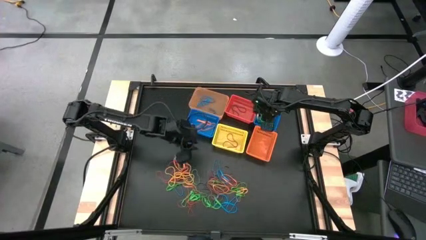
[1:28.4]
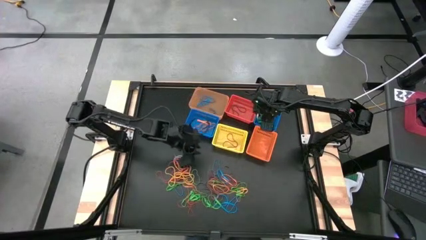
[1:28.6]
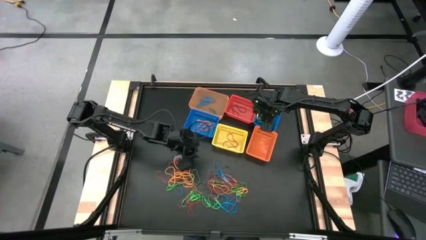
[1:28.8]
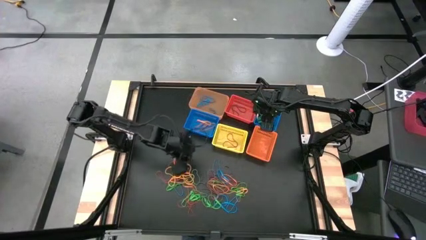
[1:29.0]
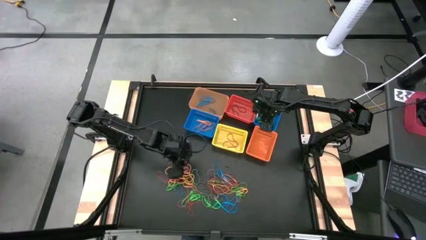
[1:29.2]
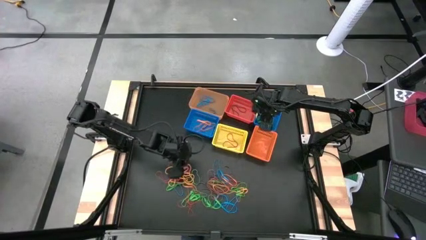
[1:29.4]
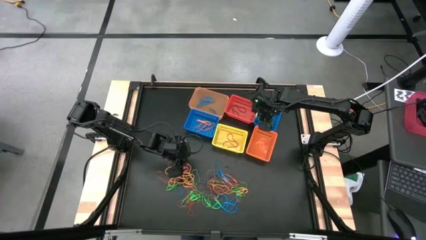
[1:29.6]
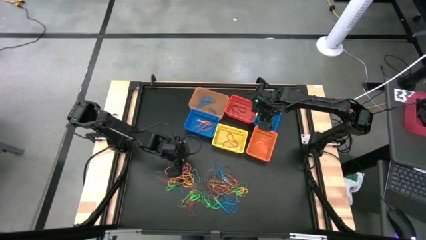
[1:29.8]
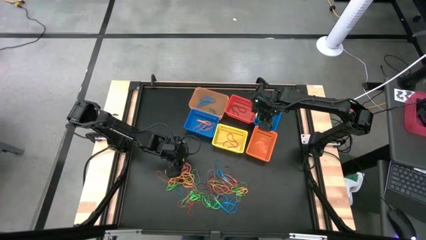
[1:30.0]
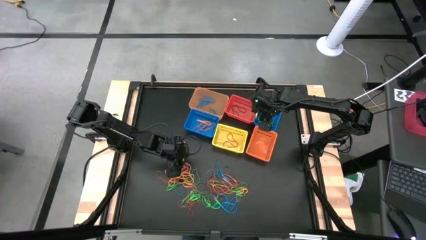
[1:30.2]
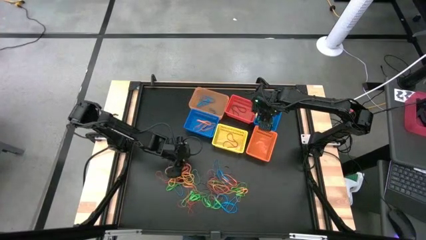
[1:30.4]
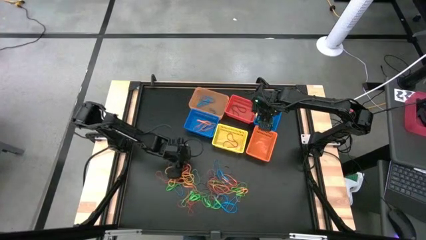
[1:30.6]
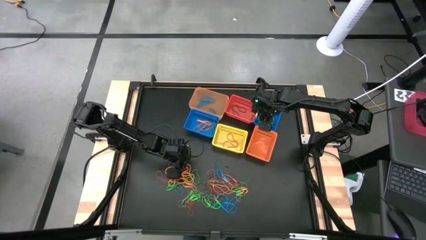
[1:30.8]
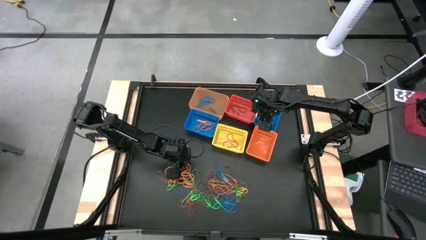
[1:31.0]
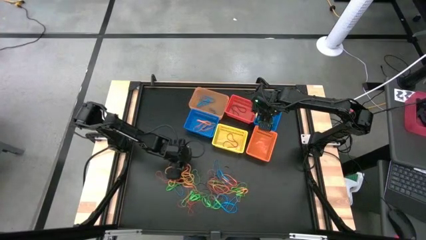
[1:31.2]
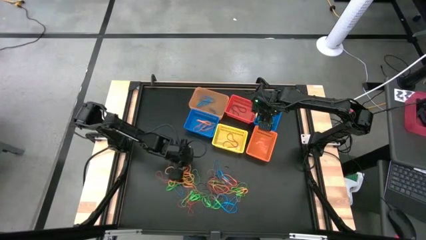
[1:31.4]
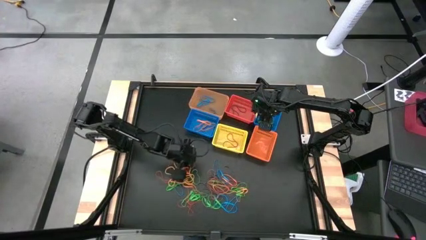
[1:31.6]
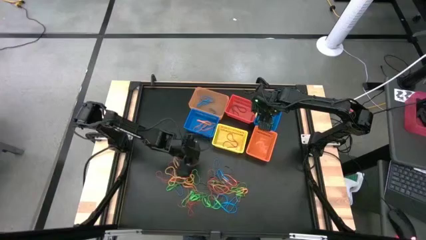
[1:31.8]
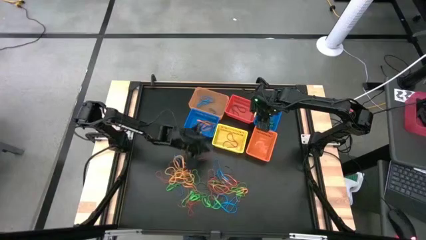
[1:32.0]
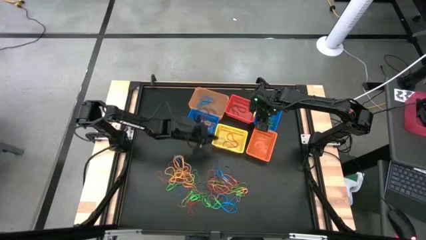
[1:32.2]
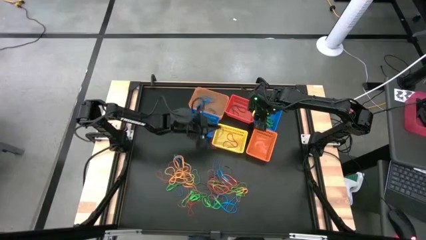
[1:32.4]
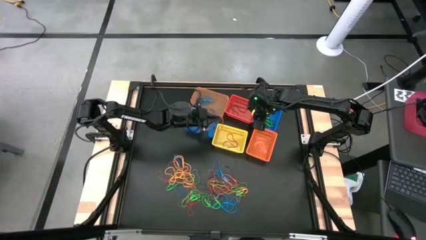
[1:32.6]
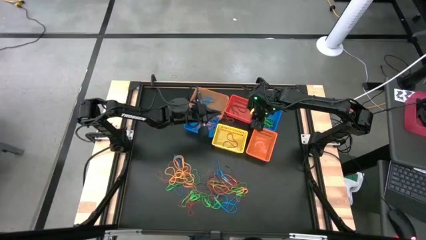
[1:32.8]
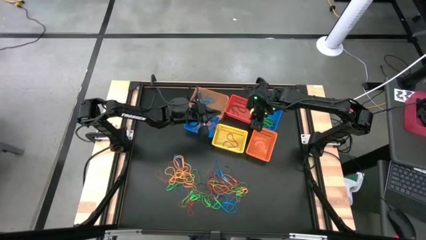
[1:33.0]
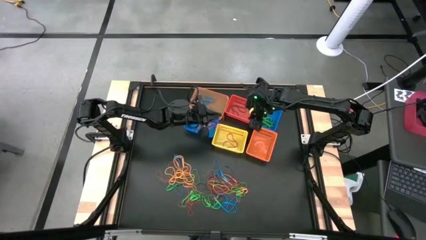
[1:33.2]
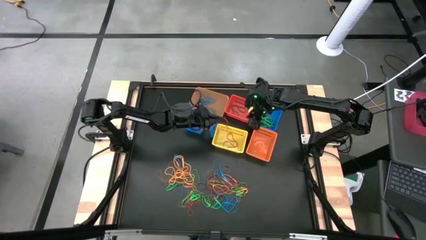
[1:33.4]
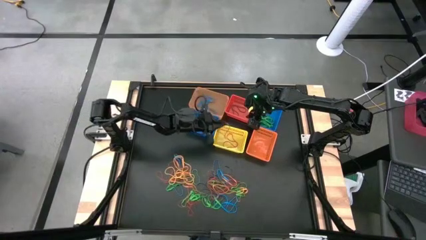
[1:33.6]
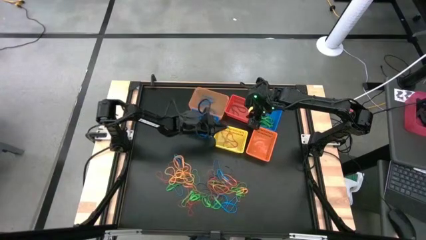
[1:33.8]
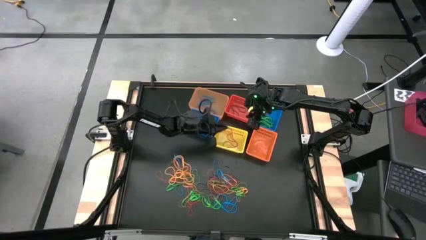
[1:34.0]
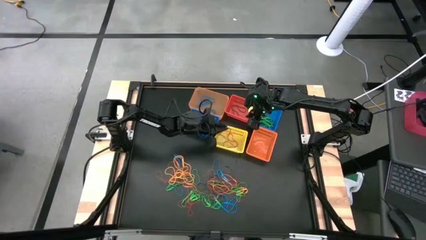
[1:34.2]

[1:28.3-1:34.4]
Task: Sort rubber bands into baskets
Put the red rubber band into the yellow basket

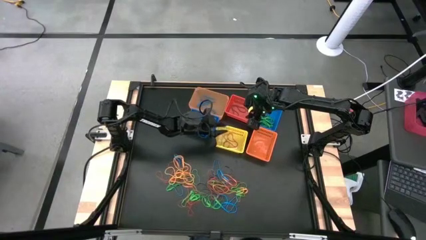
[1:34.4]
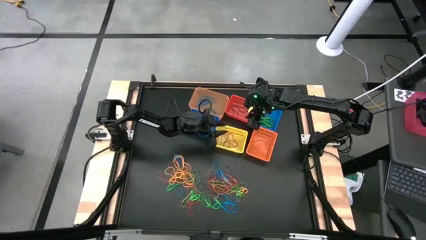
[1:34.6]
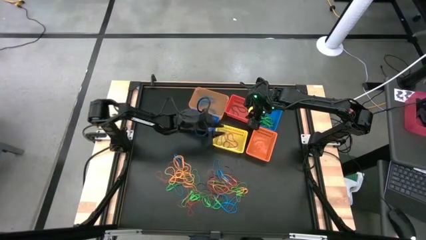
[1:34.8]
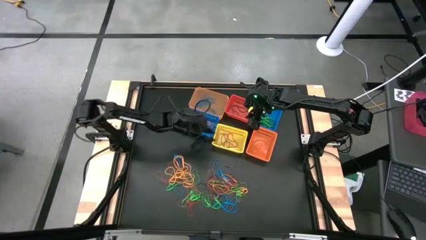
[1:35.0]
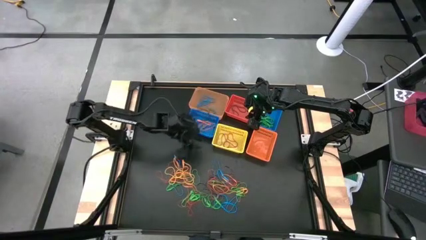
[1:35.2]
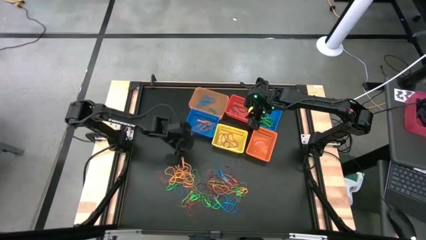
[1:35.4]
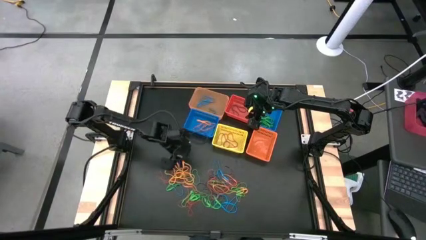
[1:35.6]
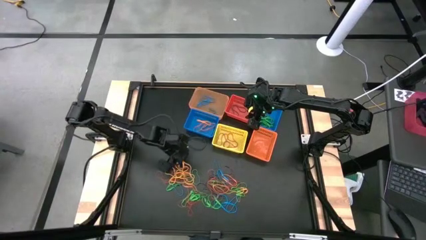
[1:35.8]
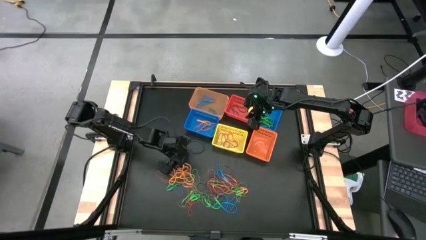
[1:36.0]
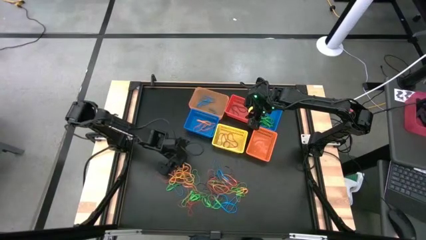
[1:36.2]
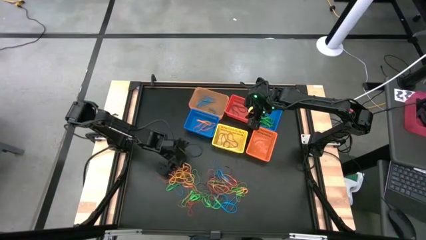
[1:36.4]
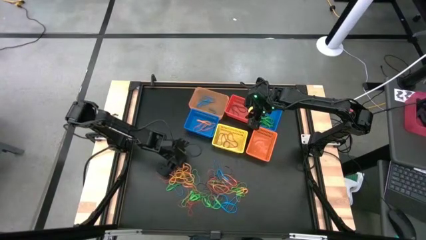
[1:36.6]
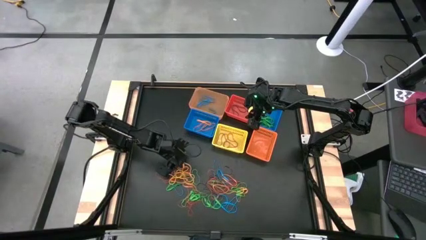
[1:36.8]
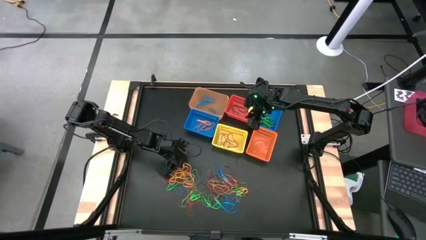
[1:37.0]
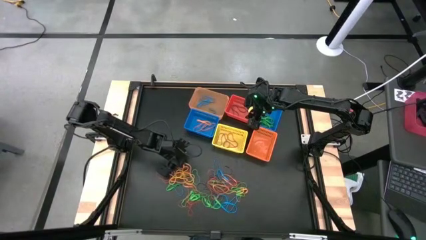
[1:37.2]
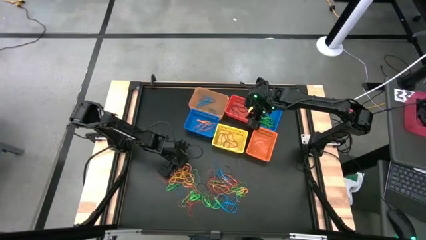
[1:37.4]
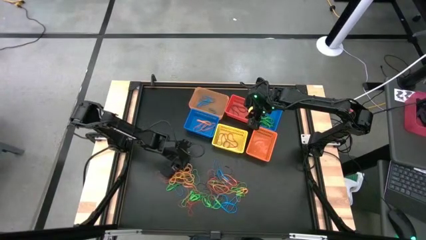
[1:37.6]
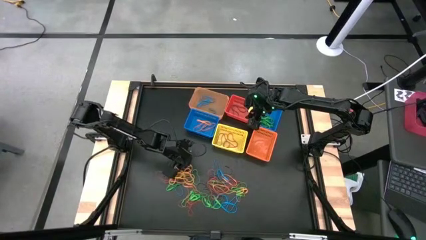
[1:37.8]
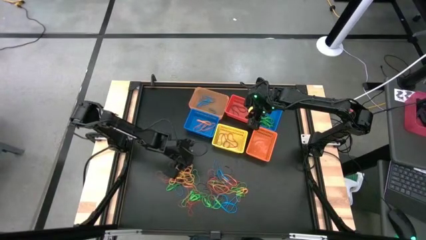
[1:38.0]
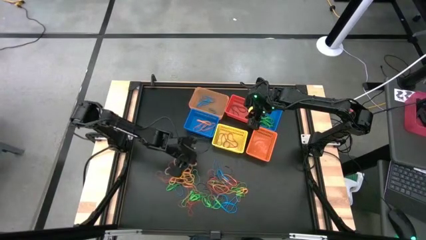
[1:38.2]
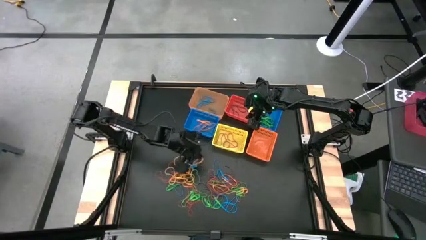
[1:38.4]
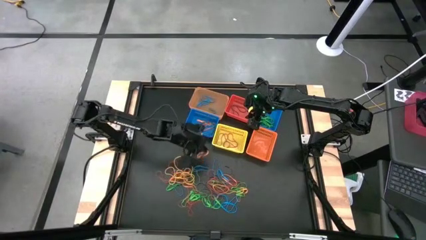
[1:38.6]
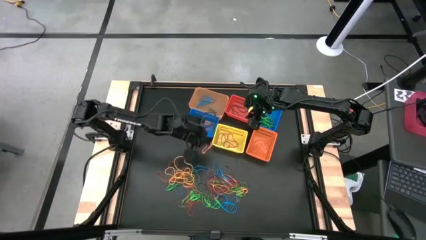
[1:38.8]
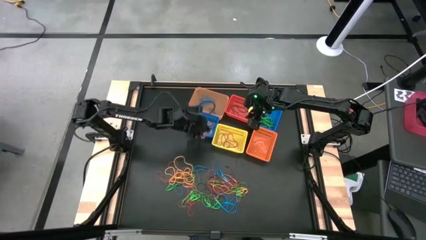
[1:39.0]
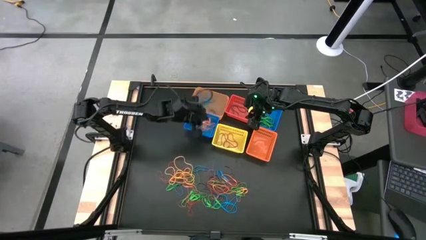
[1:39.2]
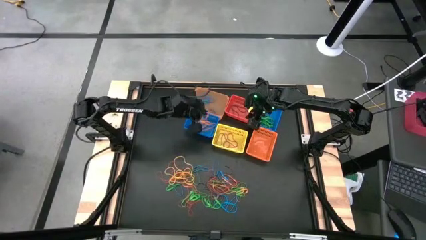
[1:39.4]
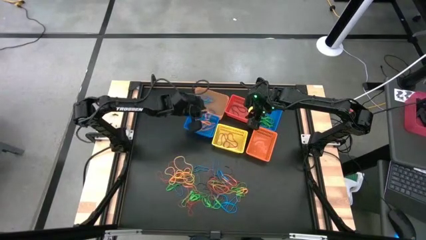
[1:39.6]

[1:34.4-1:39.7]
Put the orange rubber band into the left blue basket

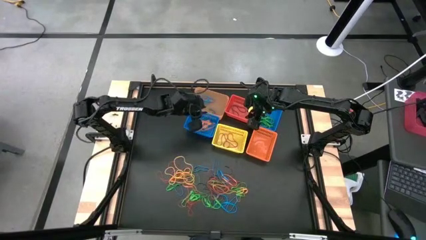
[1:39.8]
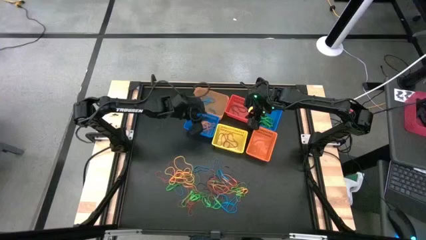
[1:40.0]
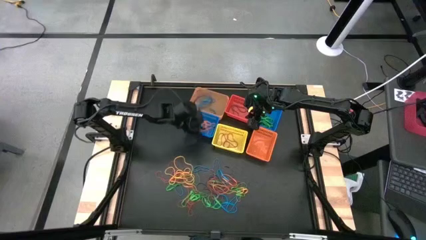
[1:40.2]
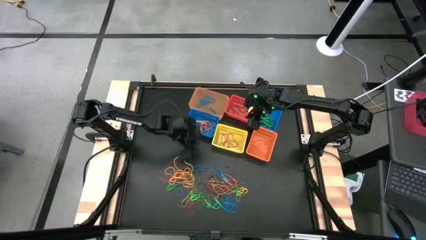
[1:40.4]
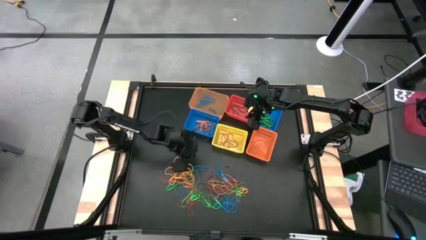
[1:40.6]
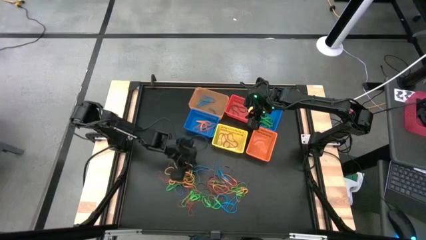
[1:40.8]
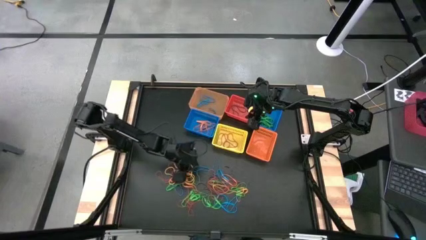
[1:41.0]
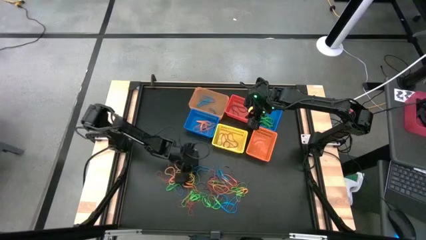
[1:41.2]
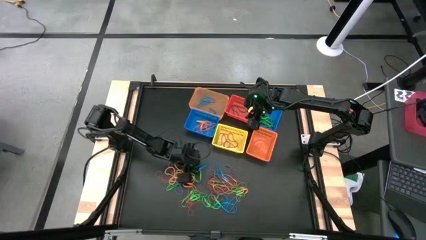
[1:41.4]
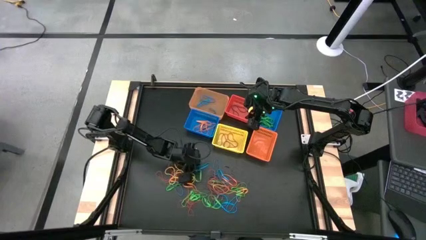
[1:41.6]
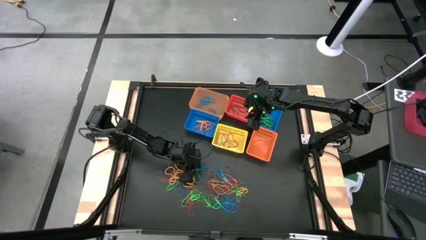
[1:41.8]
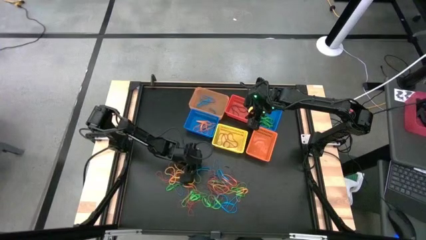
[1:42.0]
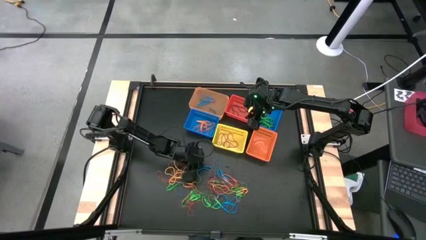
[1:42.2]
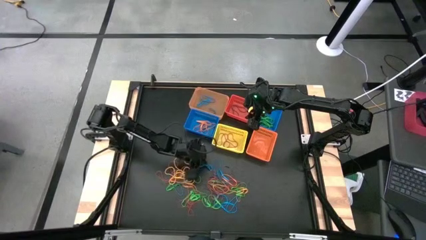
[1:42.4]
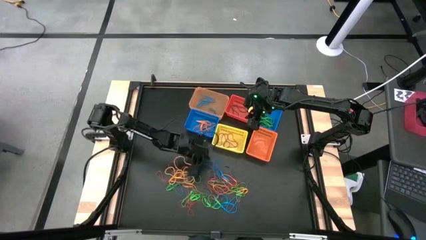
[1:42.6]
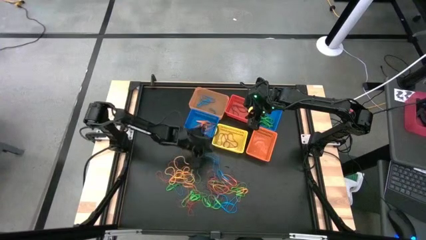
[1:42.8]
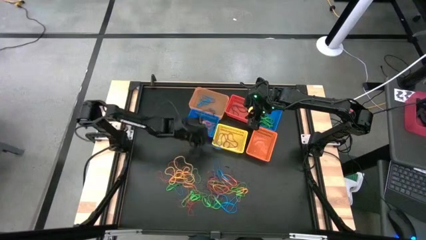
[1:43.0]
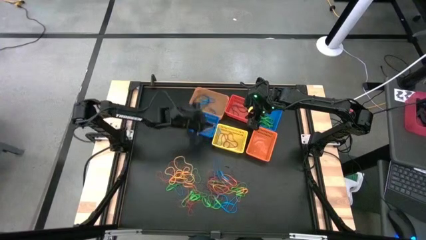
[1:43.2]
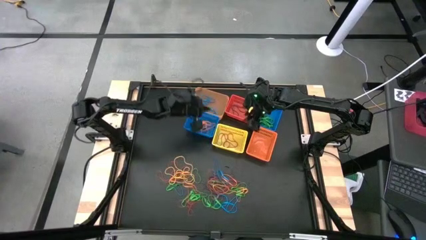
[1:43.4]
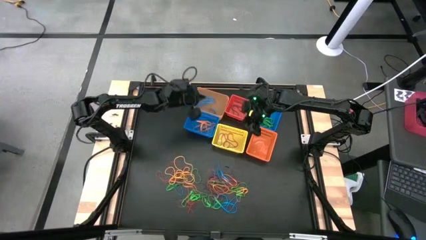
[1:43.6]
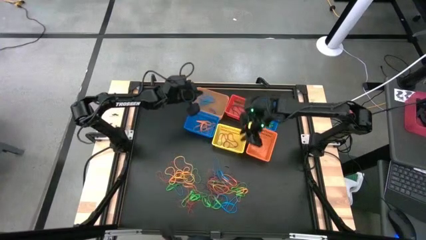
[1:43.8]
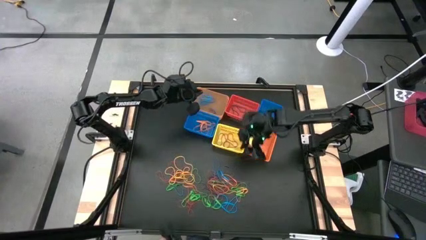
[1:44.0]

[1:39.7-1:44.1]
Put the blue rubber band into the transparent orange basket

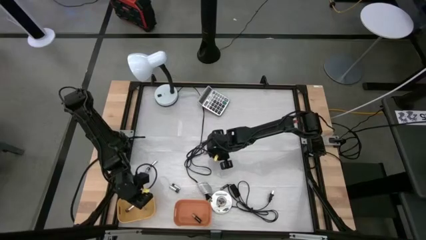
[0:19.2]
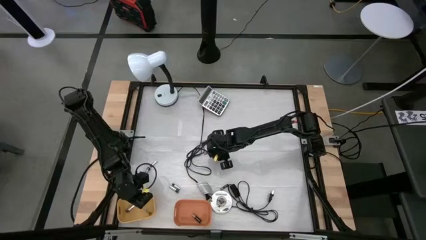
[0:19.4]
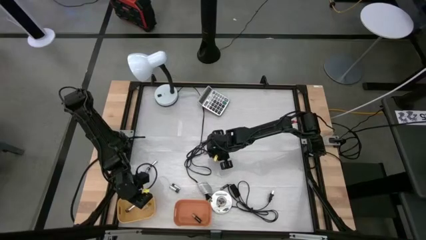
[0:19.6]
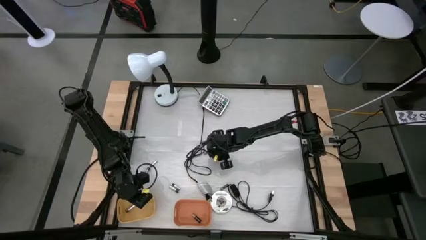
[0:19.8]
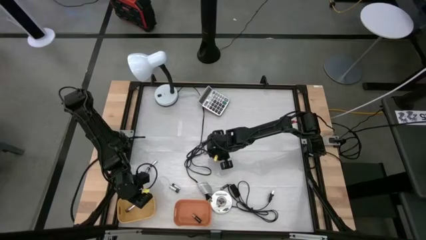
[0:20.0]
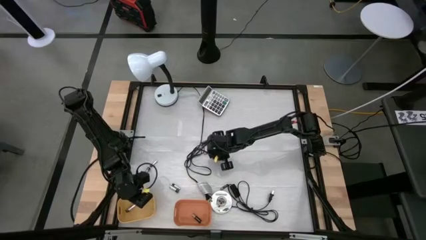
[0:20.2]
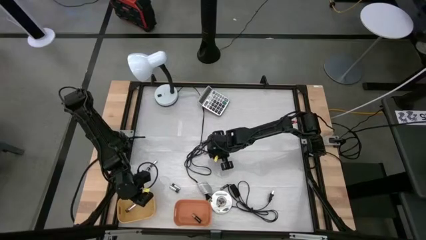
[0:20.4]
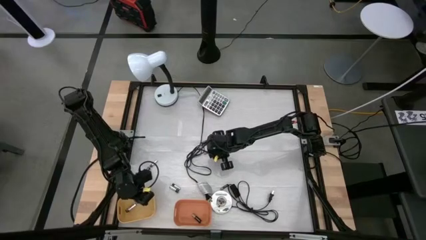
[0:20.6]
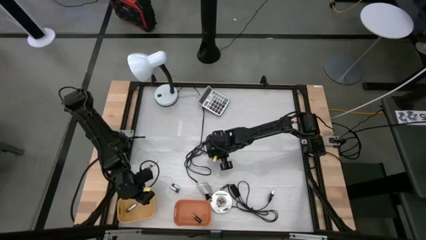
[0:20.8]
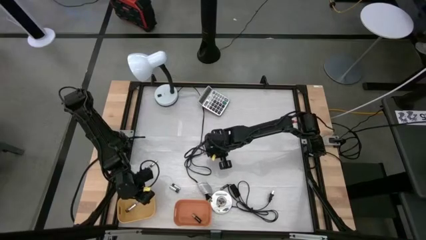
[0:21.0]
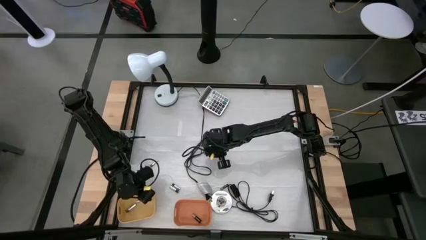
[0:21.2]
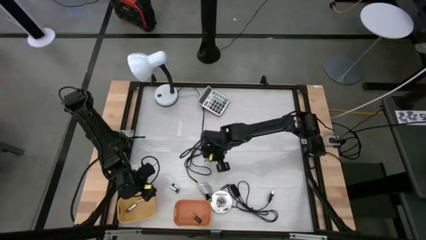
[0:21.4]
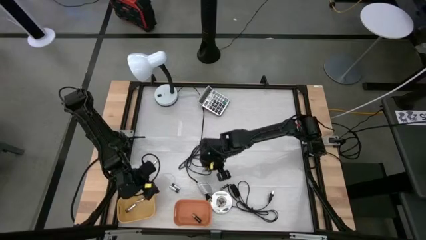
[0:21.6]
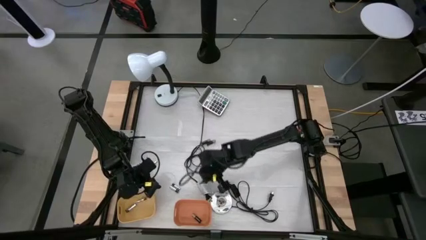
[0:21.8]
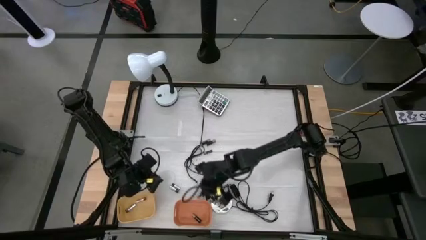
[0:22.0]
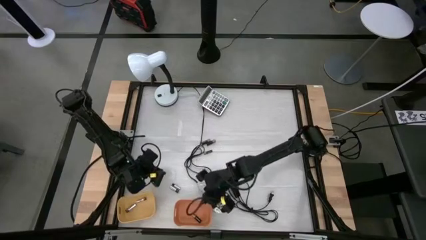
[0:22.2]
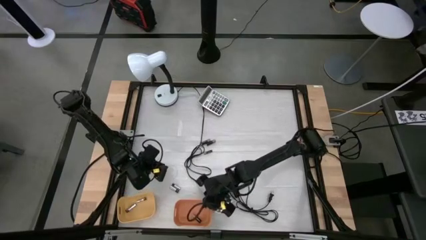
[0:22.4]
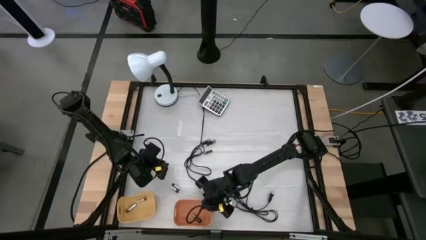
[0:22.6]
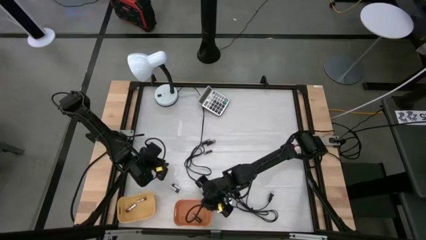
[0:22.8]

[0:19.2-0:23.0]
Task: Sort batteries
Put the black battery into the orange bin
